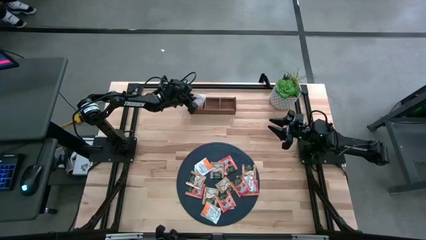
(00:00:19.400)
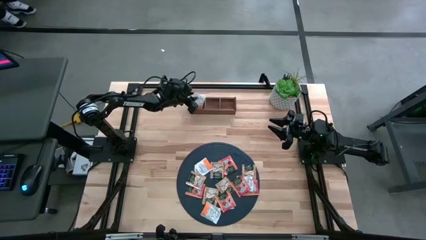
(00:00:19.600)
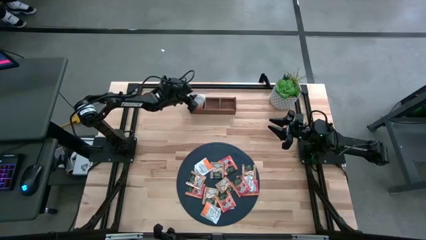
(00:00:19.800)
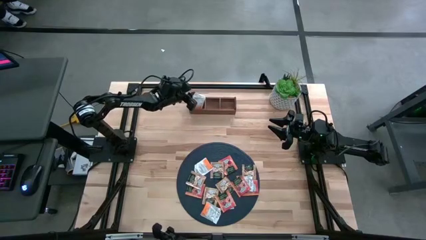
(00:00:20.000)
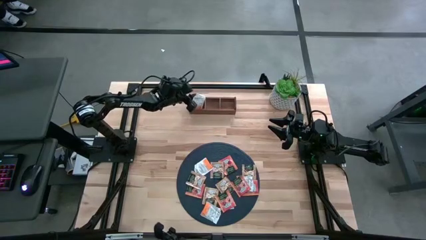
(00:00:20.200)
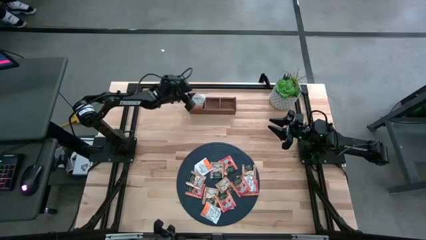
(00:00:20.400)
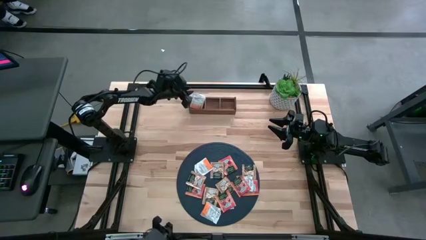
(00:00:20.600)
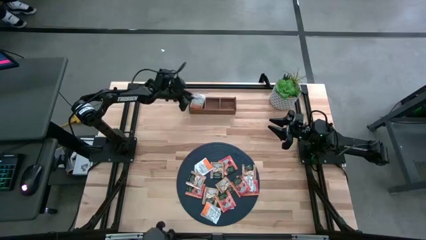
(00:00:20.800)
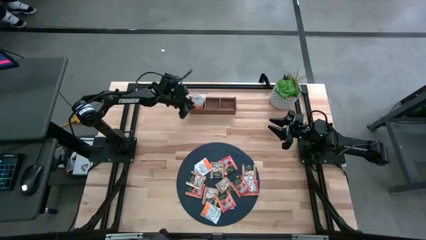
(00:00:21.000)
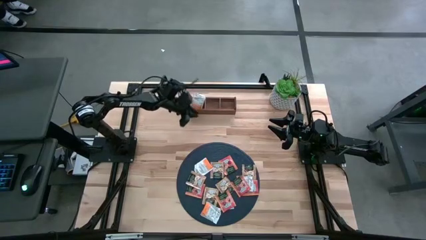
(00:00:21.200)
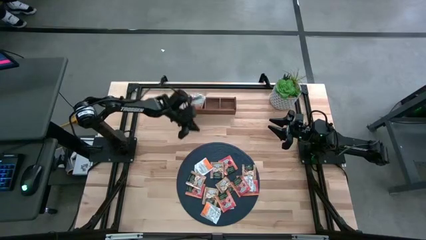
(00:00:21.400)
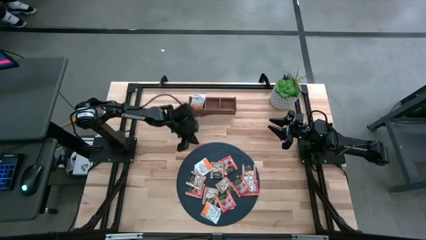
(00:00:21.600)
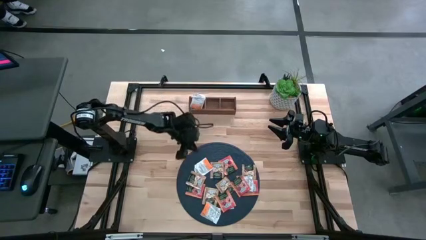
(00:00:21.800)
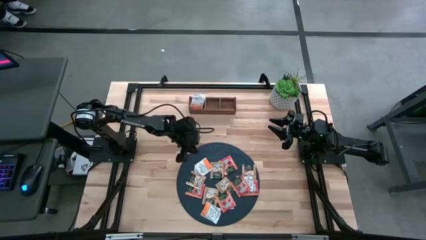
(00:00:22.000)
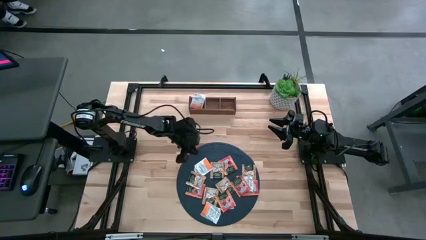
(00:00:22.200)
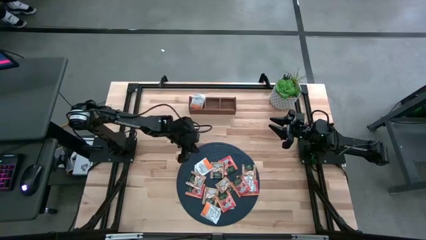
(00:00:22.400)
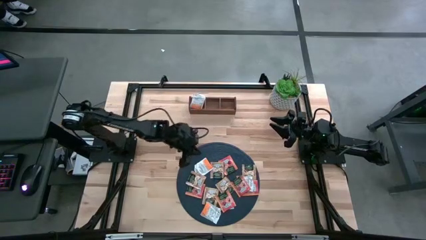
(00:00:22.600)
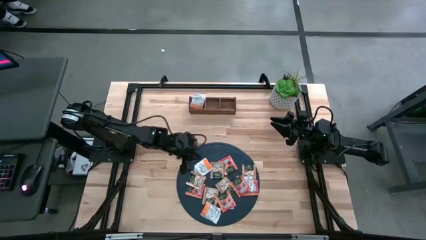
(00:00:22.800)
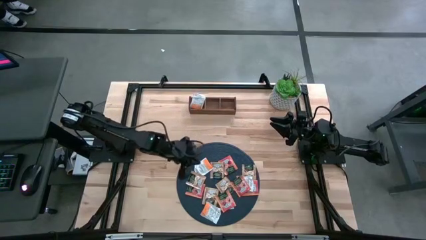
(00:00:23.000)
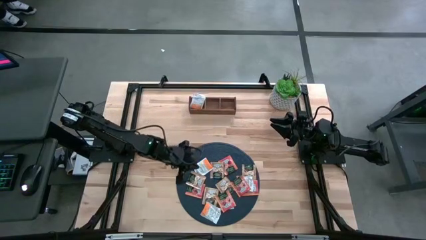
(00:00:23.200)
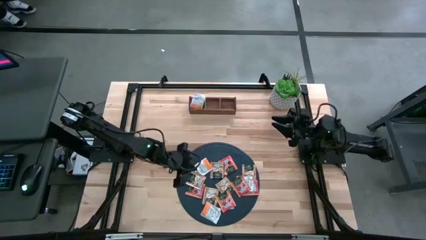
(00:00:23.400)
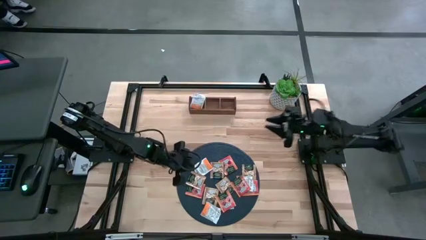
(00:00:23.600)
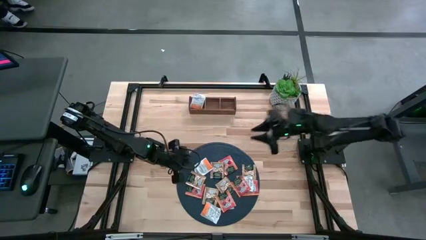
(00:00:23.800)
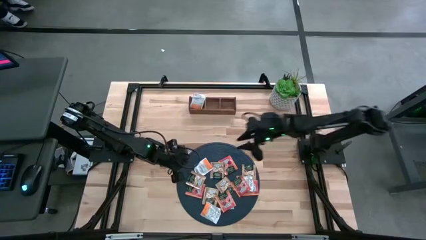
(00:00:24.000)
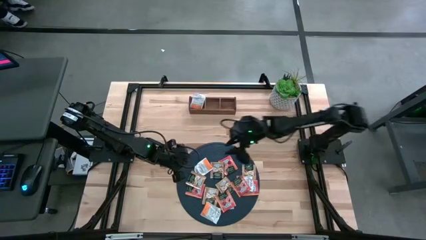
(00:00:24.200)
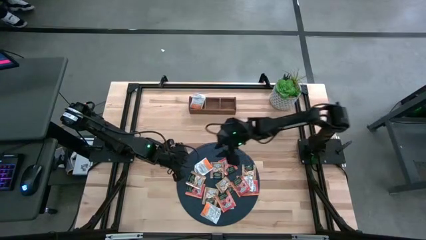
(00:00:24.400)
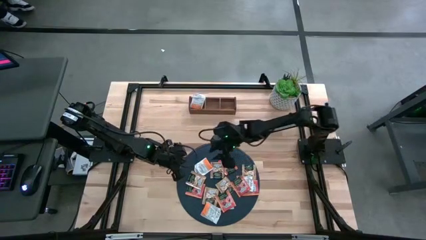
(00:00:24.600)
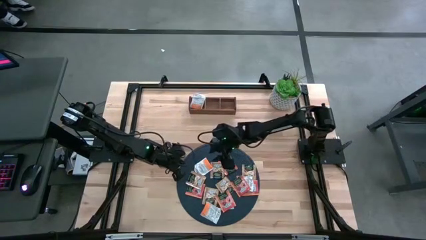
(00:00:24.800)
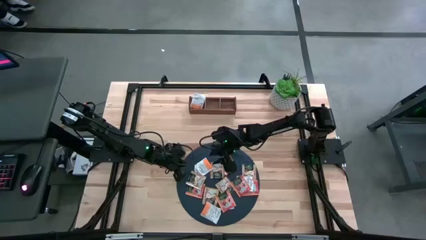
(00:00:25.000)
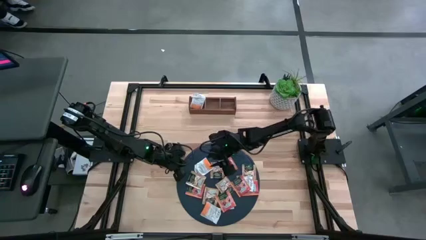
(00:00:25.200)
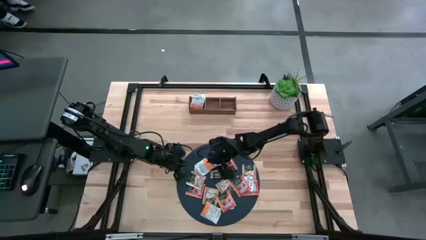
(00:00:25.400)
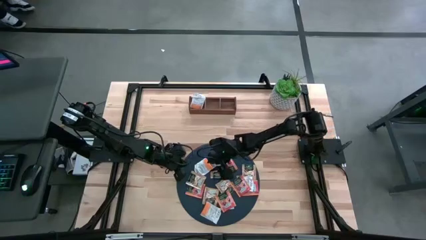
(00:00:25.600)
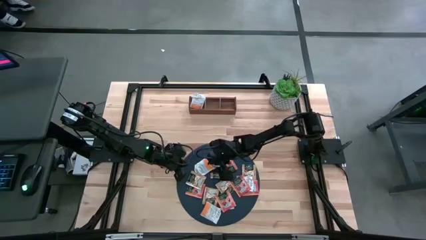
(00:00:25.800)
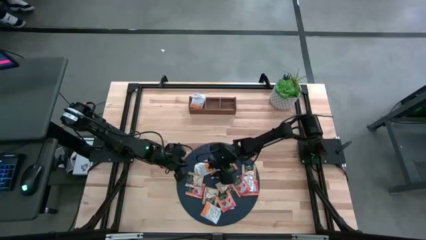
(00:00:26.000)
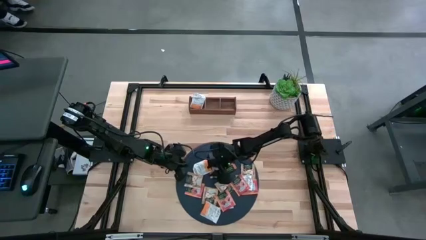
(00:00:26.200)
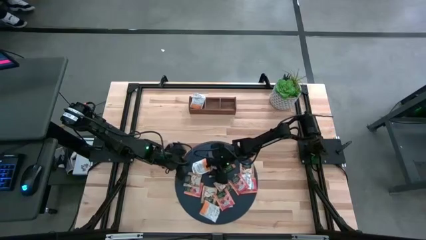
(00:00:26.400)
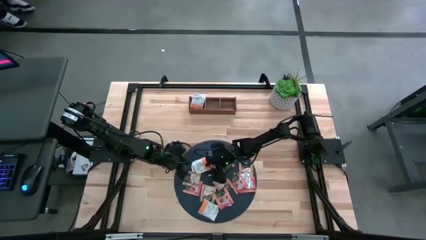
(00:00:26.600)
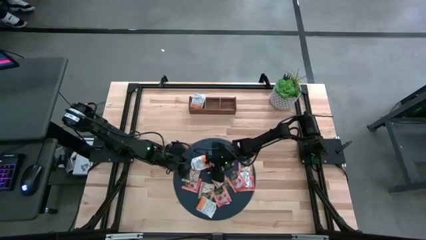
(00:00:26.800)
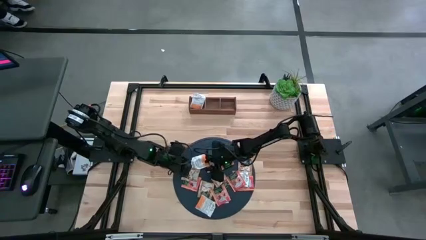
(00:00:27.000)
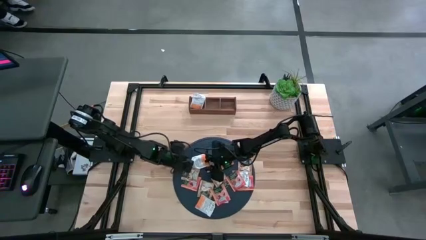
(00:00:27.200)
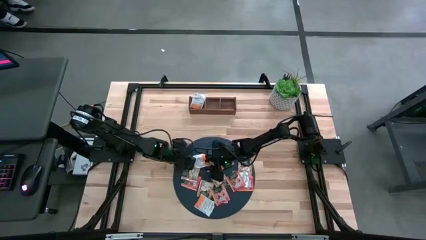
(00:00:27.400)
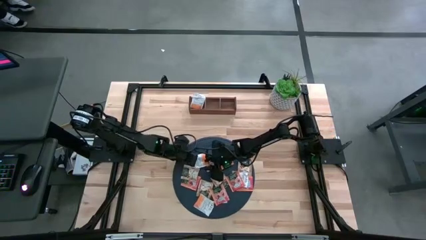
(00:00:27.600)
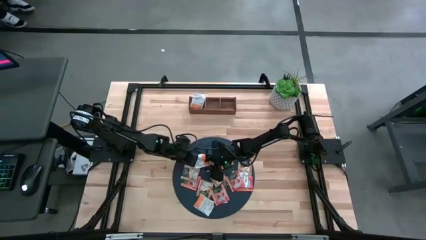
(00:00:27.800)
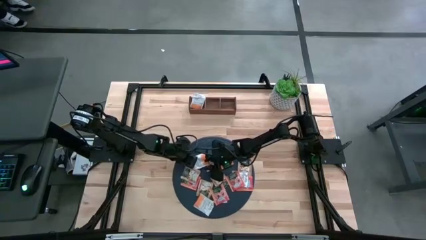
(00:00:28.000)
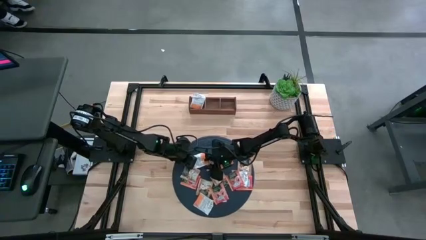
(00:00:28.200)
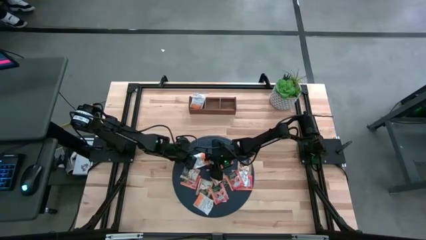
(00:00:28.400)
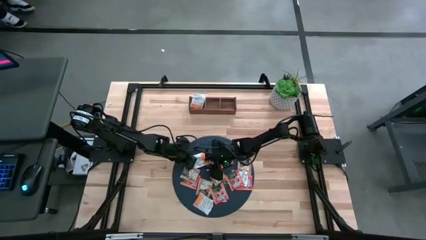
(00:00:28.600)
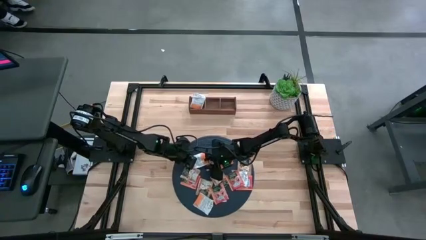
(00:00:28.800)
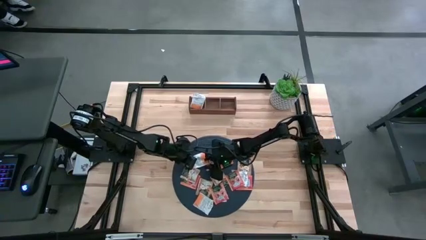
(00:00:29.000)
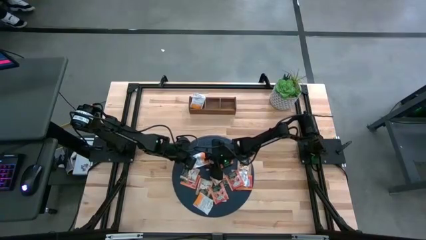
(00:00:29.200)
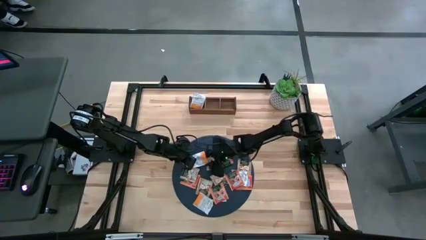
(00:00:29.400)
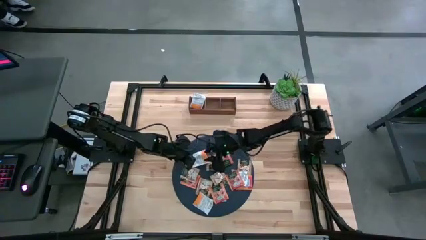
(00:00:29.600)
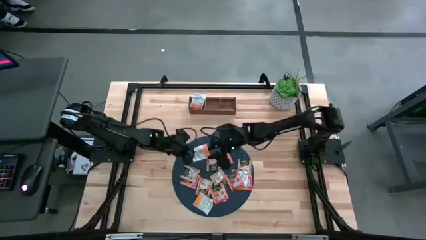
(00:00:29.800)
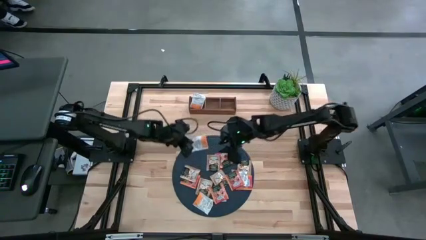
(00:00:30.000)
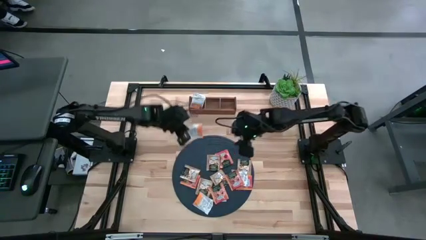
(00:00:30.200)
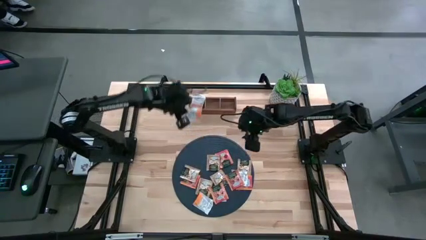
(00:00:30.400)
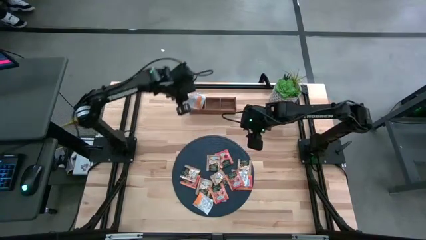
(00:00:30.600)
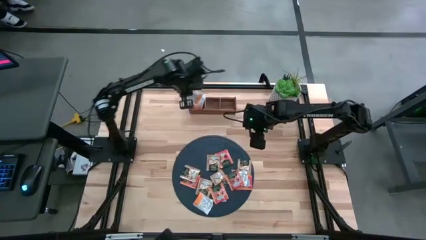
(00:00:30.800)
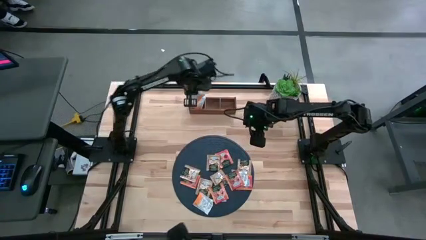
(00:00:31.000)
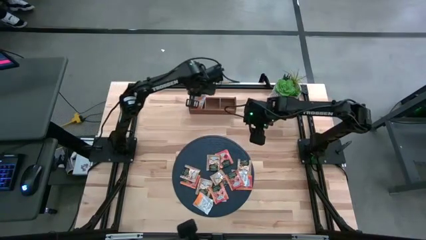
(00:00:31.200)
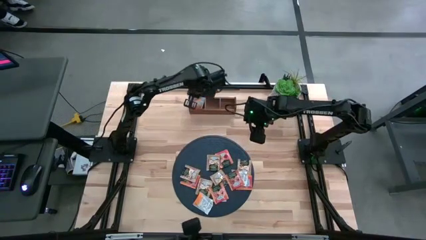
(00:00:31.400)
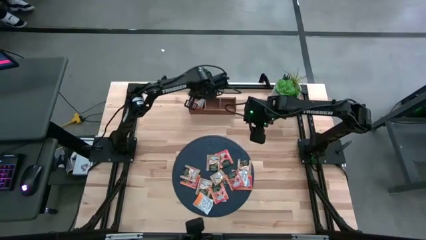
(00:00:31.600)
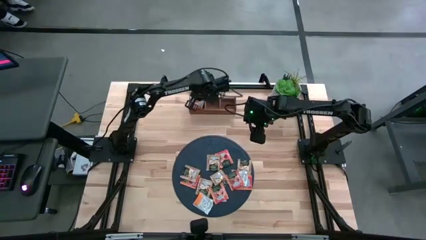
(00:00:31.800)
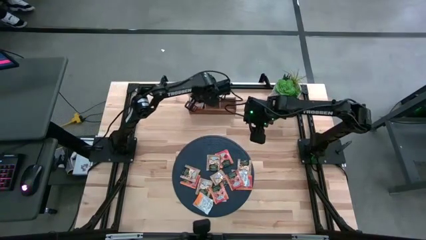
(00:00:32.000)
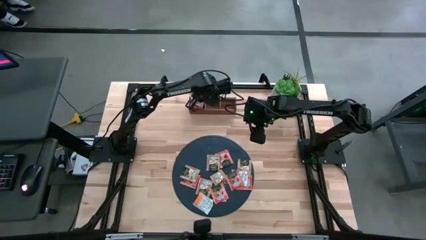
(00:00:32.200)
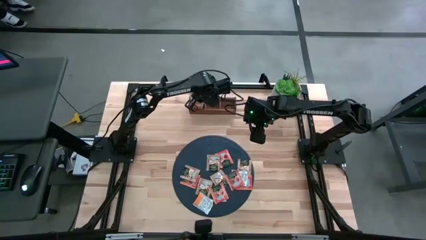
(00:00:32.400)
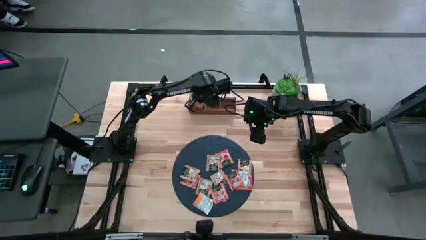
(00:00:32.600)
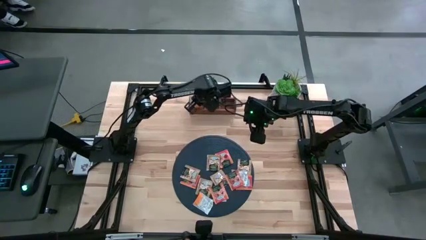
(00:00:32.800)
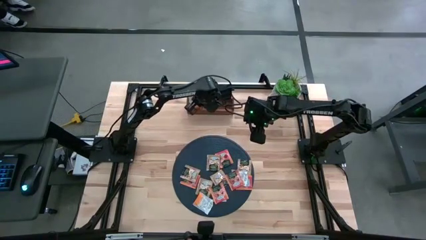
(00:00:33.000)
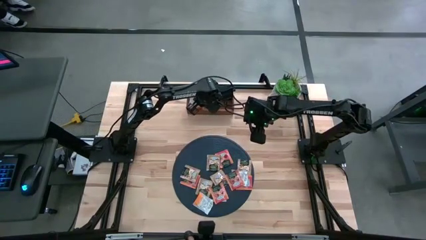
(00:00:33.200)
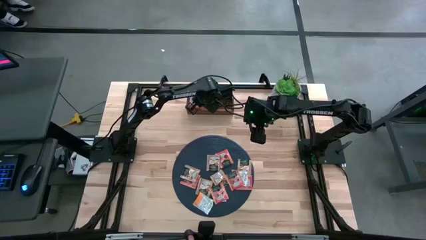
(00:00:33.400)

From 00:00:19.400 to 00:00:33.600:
Task: Pick & Place Tea
Put the white tea bag into the left section of the wooden organizer
